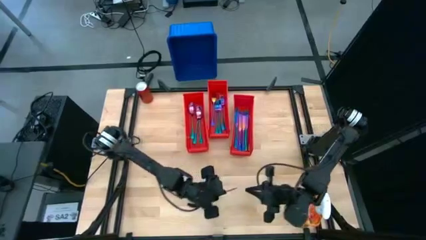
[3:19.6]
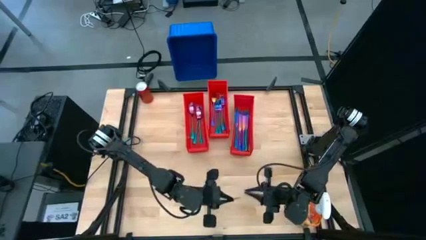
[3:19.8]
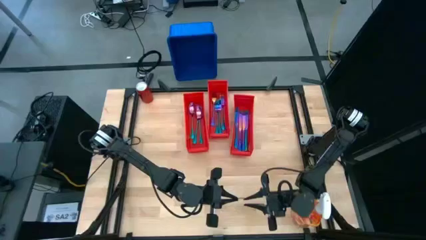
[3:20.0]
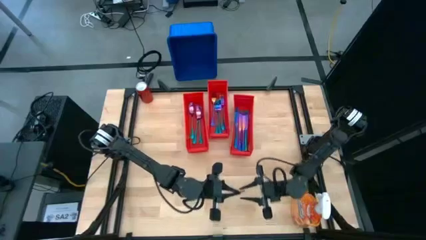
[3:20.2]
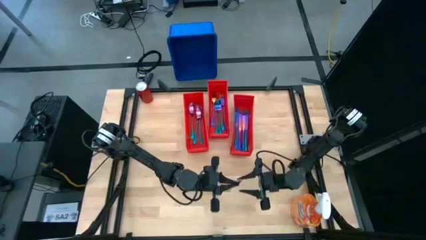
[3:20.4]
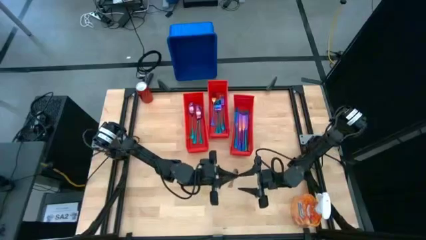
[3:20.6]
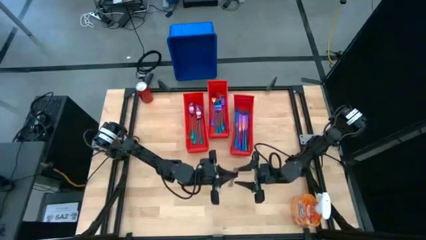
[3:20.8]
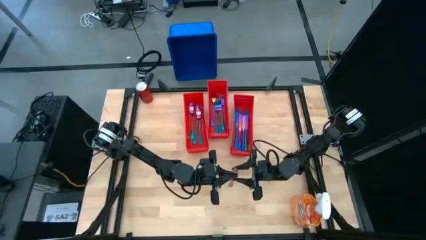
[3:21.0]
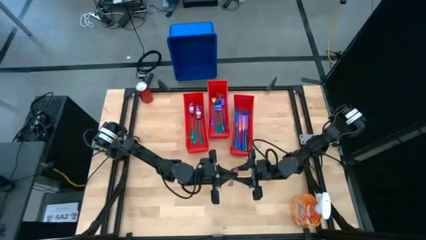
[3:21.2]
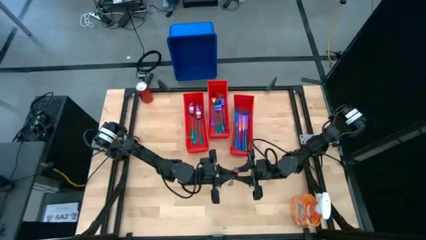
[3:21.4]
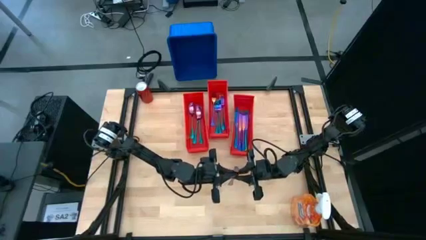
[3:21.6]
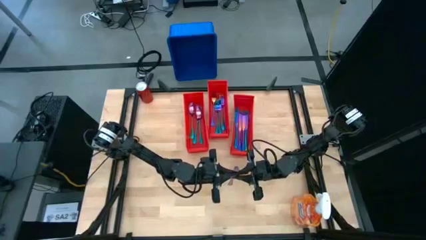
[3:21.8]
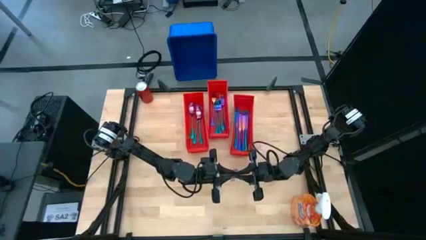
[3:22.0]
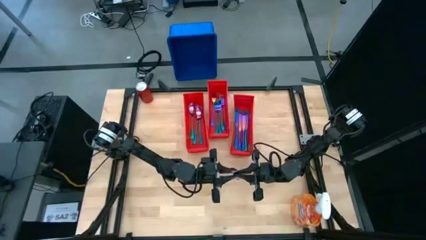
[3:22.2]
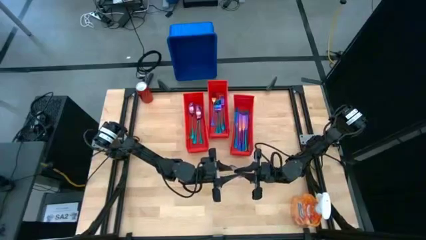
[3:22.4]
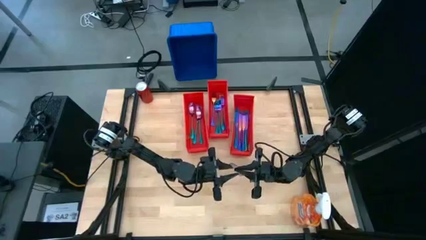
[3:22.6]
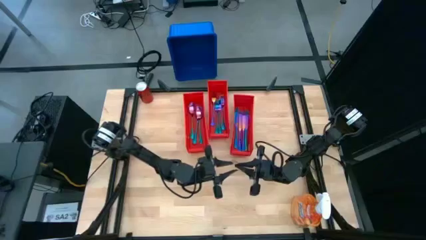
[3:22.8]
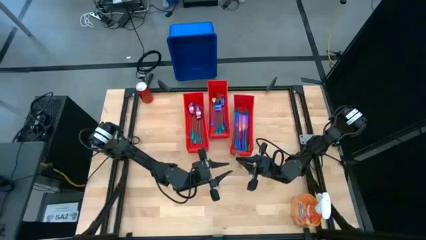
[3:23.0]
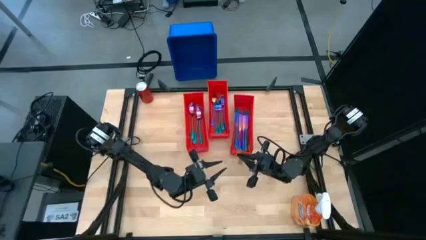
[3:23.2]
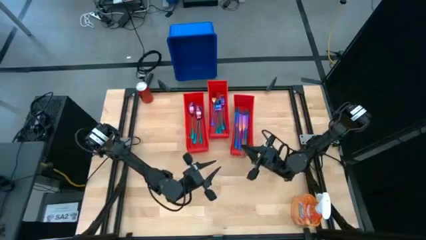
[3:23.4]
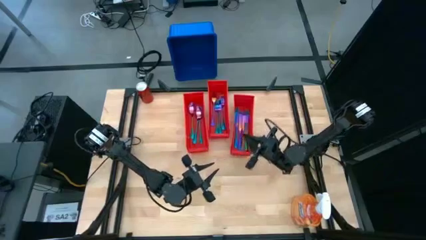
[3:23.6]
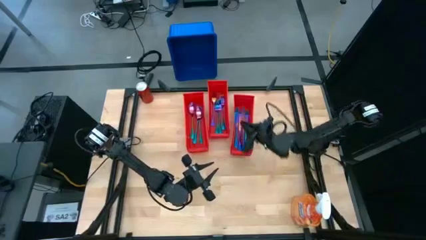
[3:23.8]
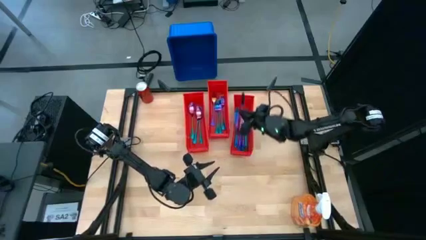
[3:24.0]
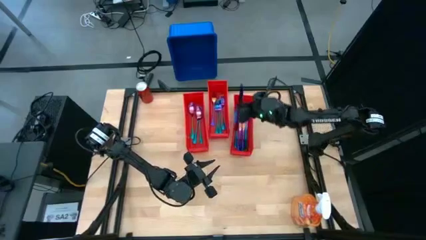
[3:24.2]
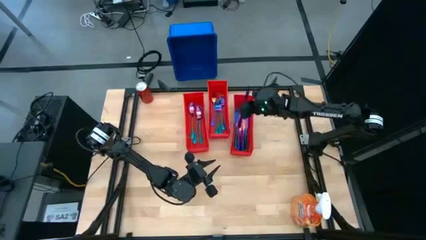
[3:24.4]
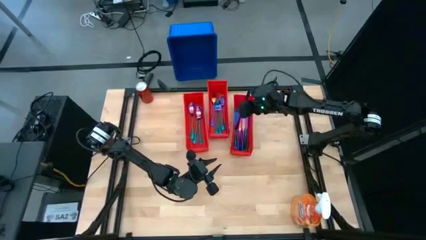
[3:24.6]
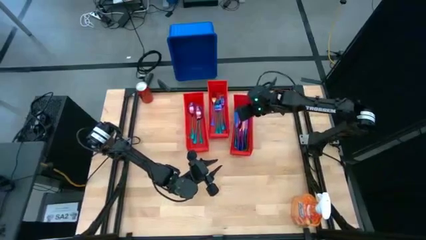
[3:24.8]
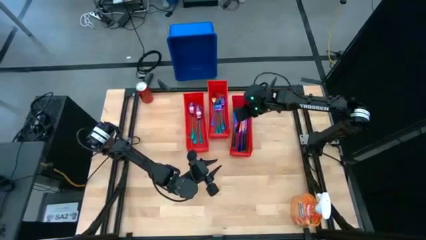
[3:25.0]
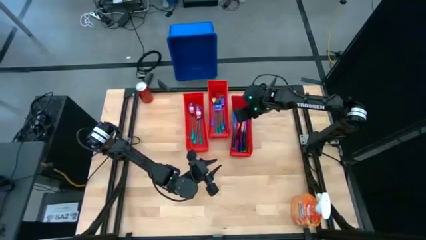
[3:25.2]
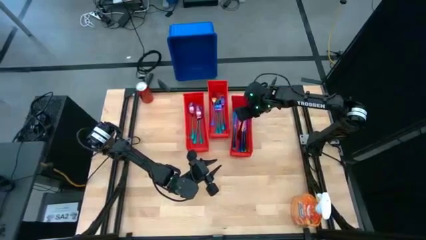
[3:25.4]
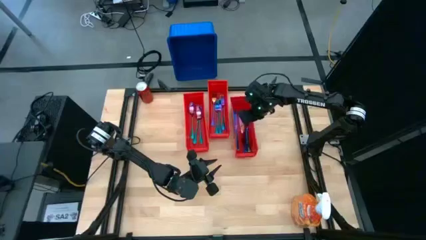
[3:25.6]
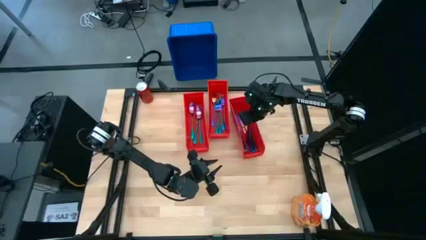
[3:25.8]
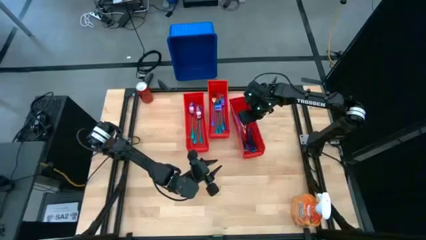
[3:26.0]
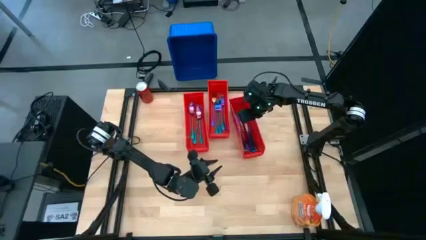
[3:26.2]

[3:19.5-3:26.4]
Task: Sort silverware
Put the iridescent knife into the right orange bin
